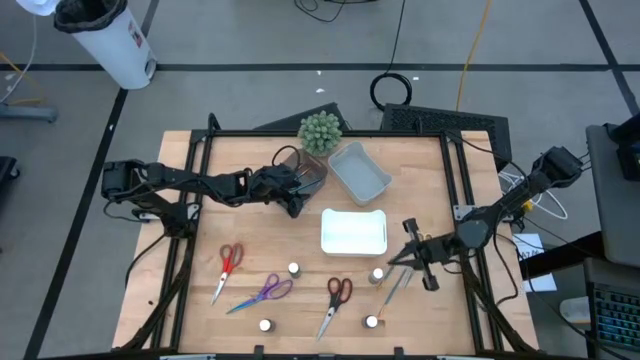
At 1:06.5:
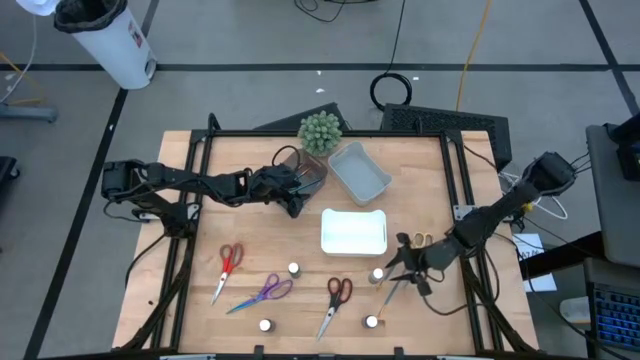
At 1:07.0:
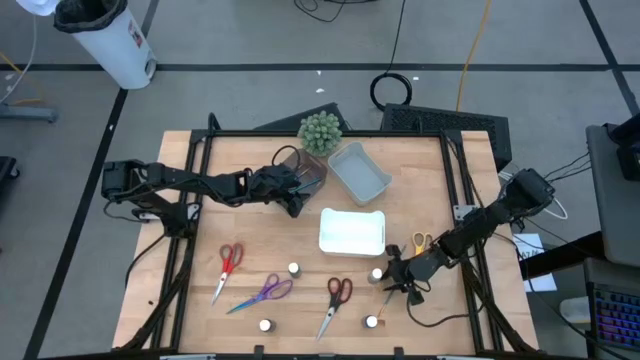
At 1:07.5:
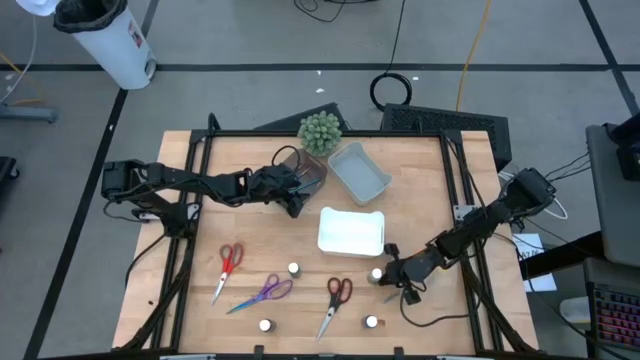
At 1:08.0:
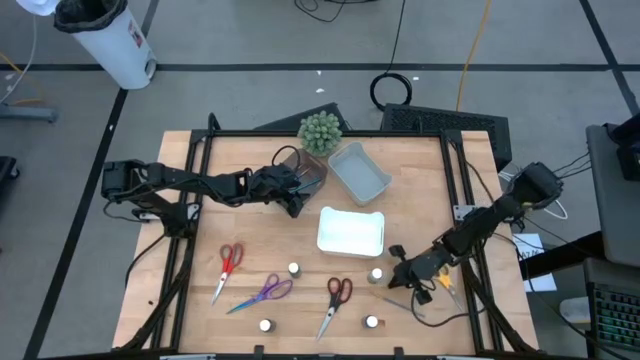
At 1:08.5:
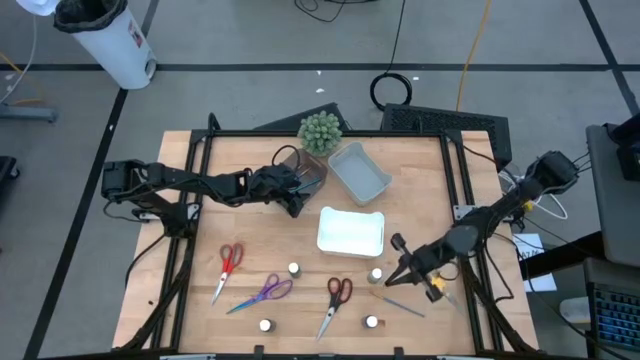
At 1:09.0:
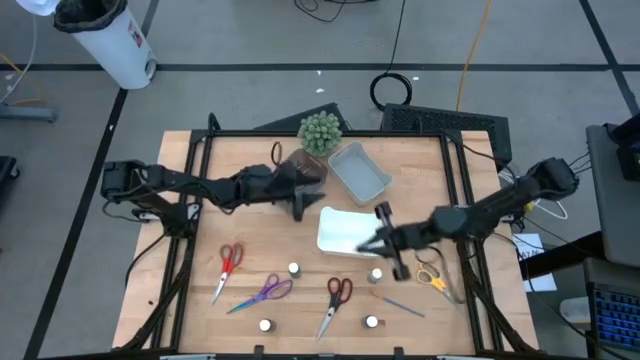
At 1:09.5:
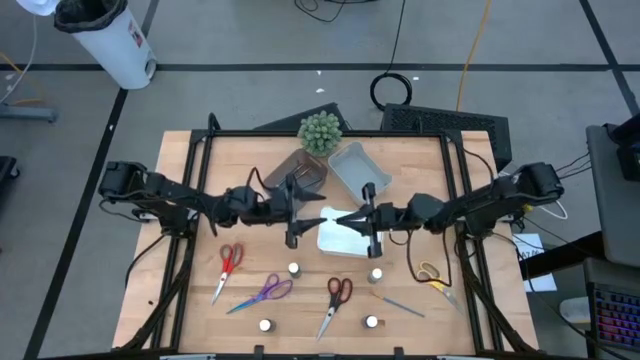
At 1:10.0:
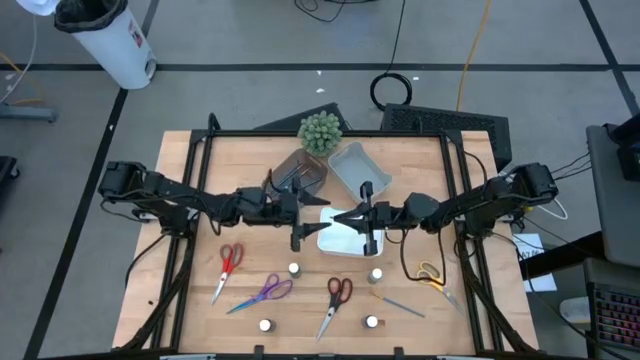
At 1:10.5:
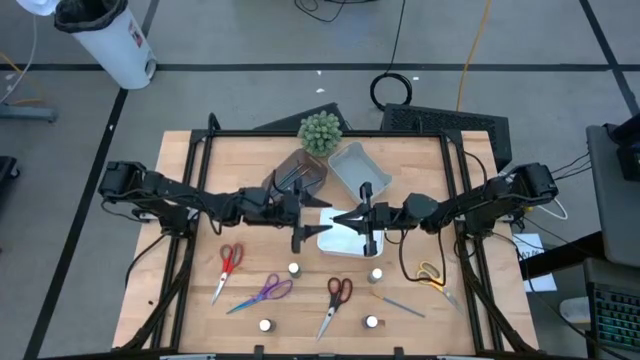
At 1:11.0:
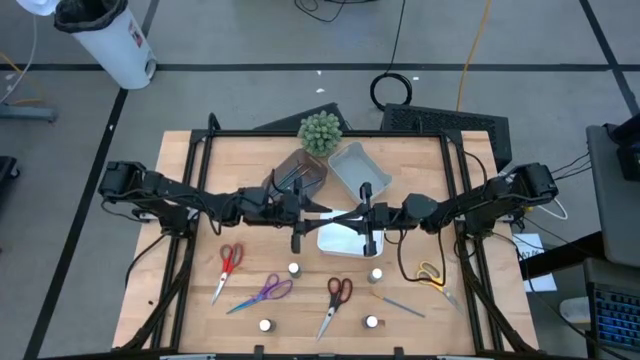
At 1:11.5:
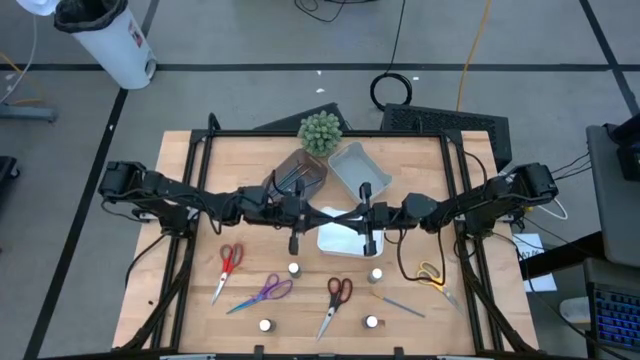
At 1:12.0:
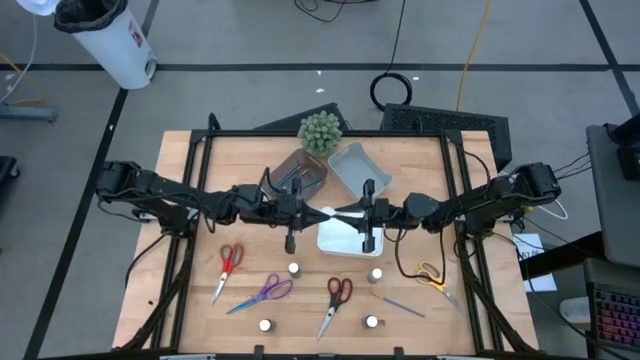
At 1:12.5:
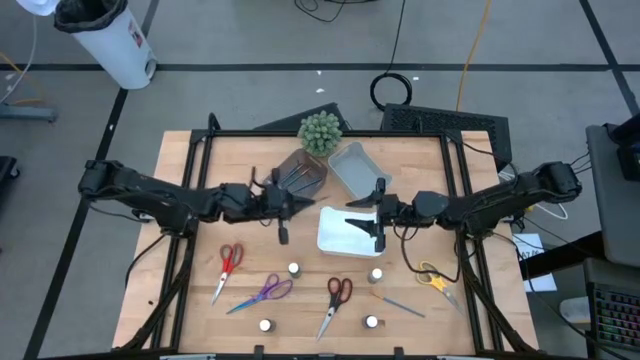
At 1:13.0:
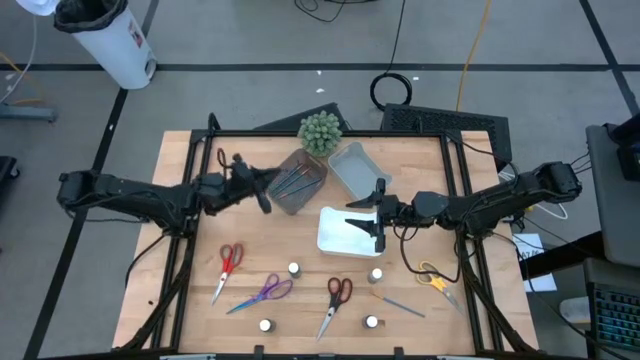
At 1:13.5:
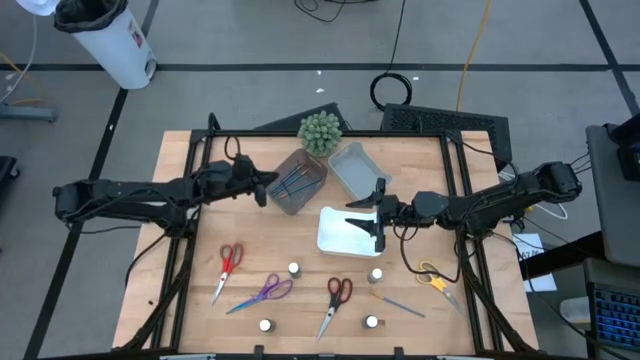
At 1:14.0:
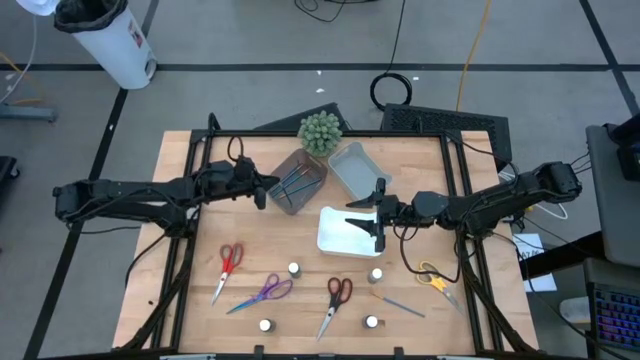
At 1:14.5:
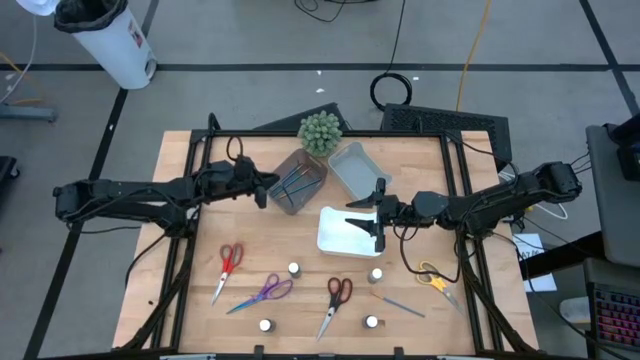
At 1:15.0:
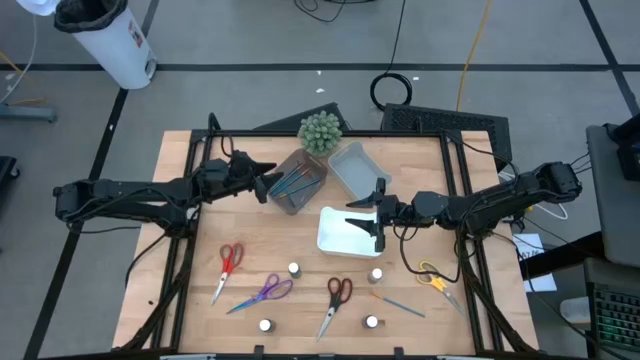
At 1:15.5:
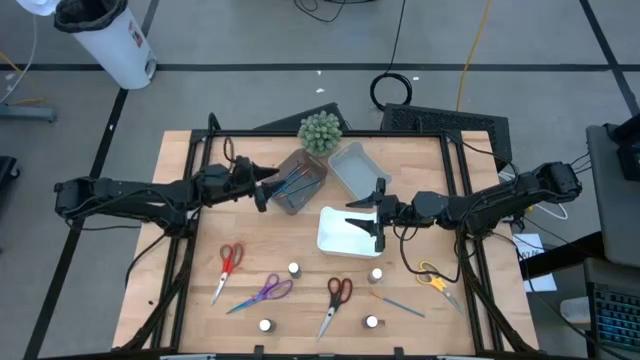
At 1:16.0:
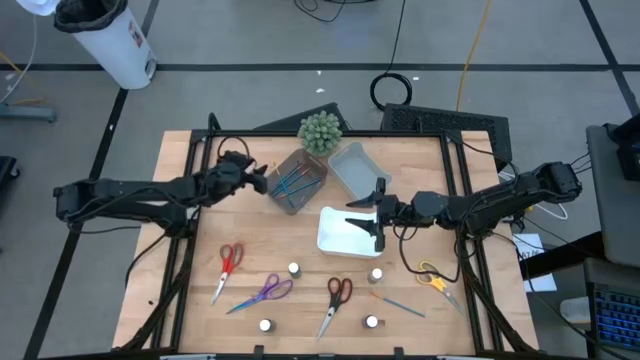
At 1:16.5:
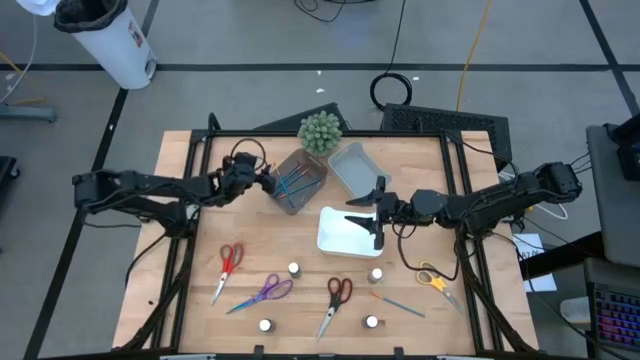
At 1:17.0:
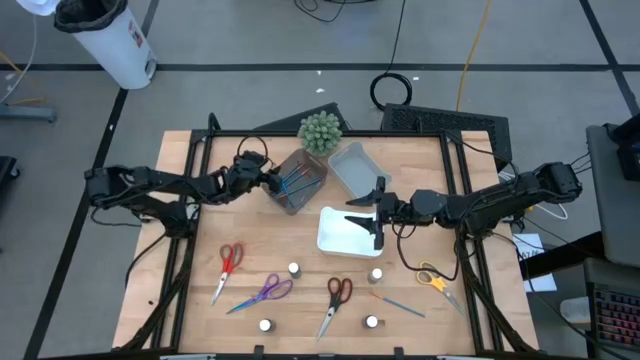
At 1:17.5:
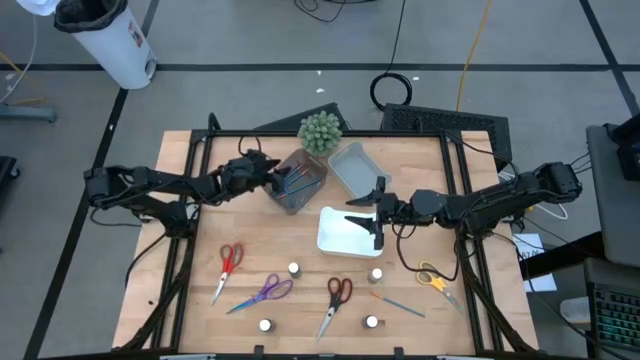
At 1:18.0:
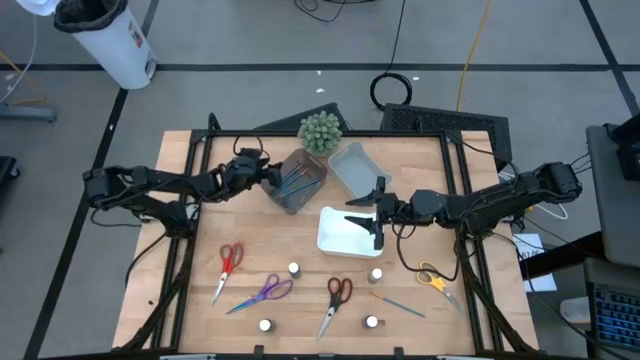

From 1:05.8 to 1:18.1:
Task: Pick & Place Paint Supplies
Put the blue paint brush into the black bin

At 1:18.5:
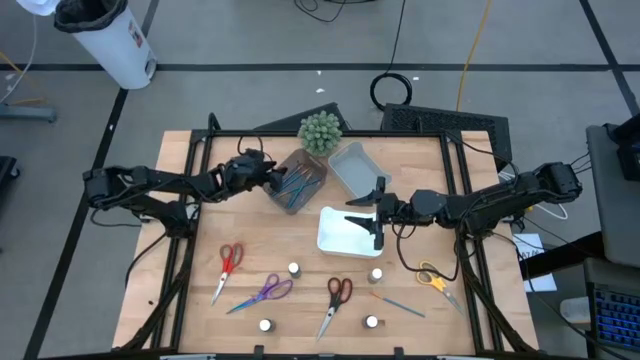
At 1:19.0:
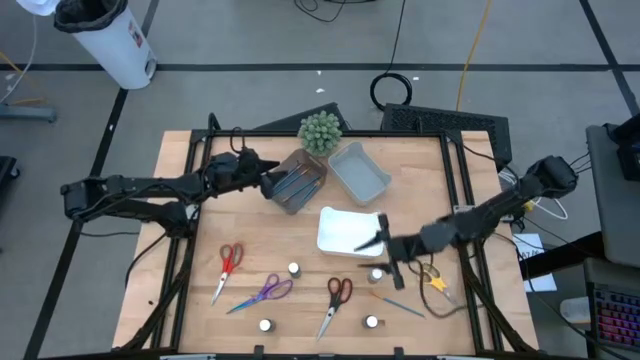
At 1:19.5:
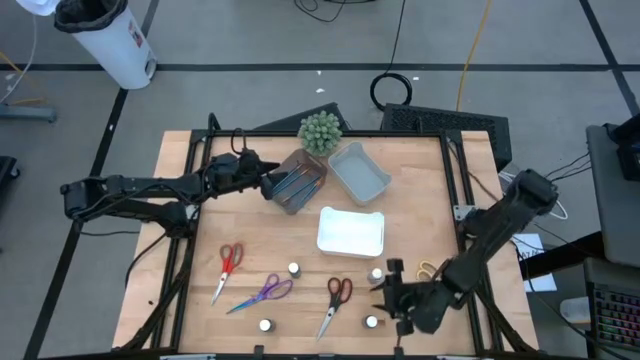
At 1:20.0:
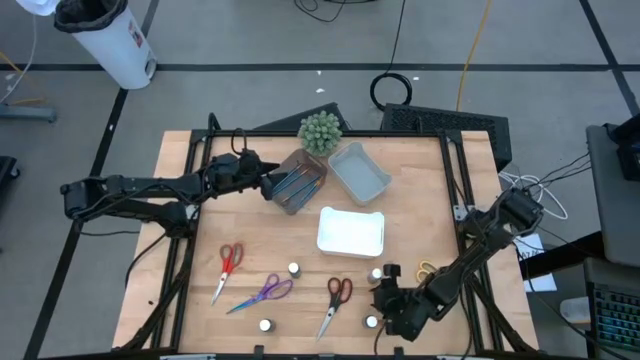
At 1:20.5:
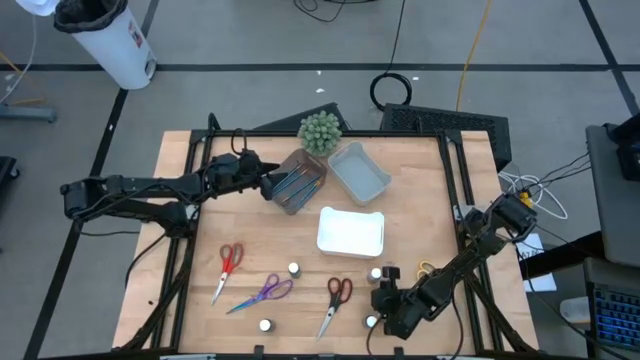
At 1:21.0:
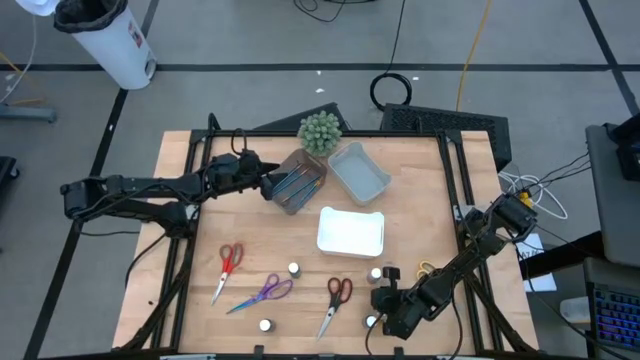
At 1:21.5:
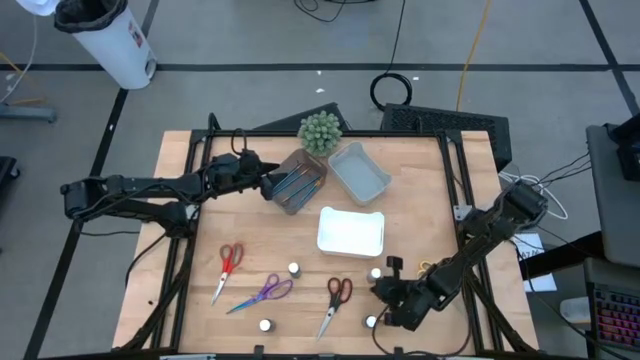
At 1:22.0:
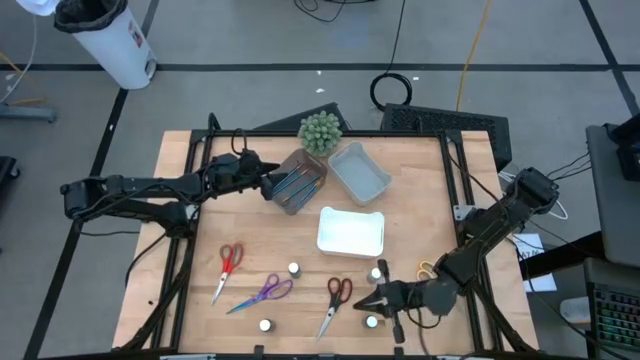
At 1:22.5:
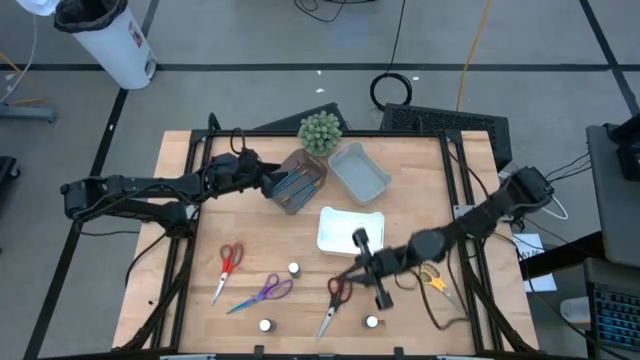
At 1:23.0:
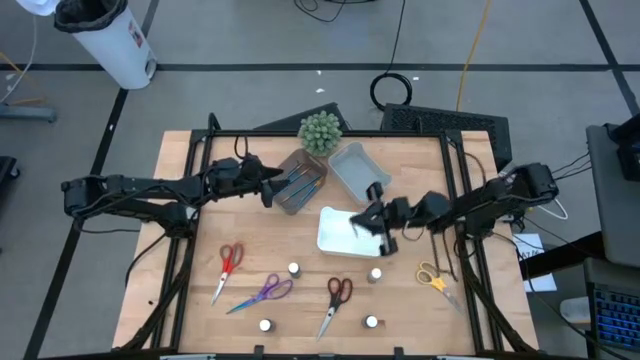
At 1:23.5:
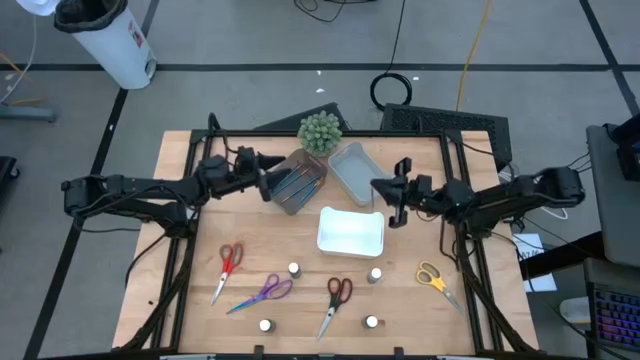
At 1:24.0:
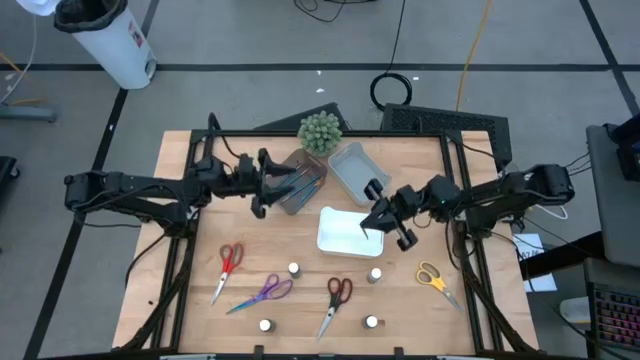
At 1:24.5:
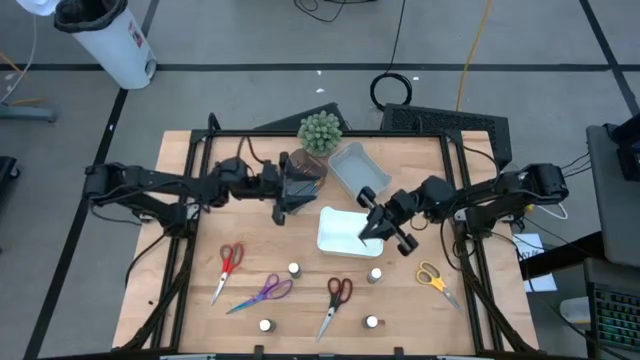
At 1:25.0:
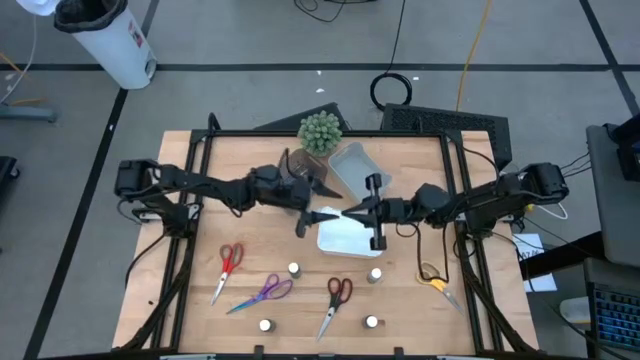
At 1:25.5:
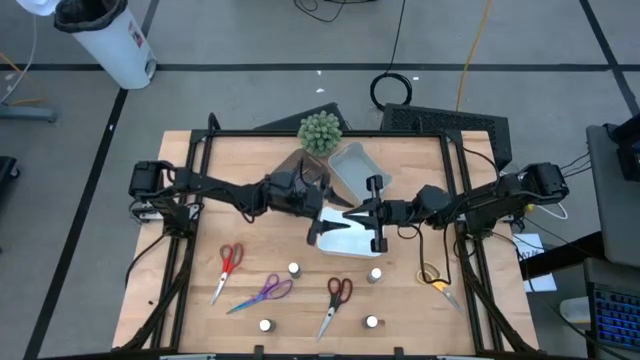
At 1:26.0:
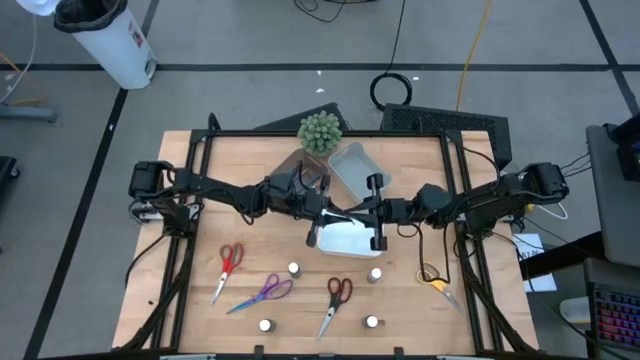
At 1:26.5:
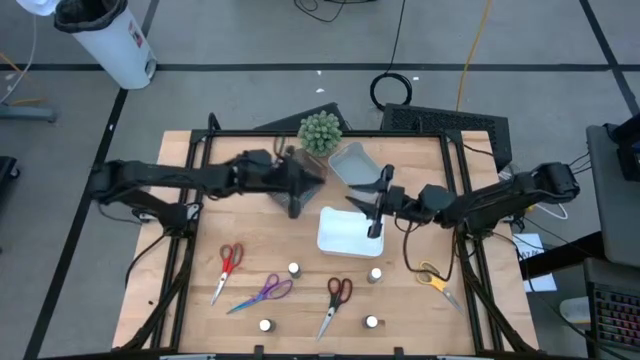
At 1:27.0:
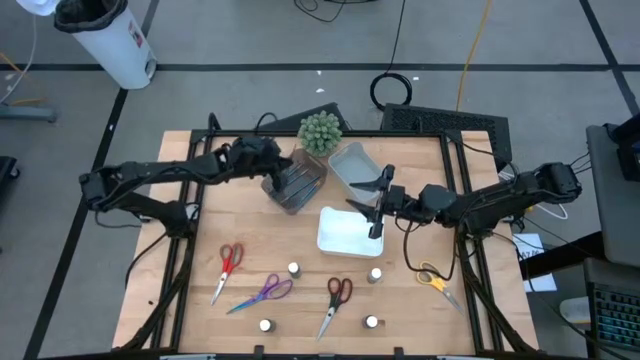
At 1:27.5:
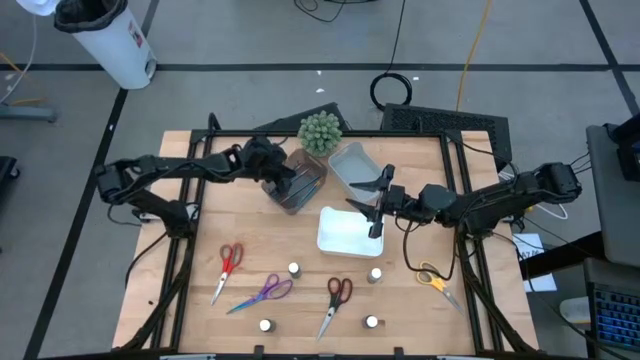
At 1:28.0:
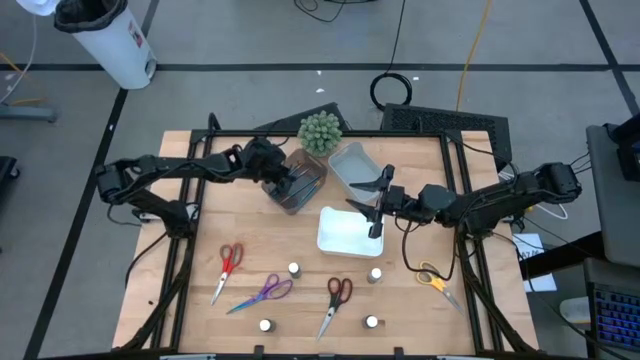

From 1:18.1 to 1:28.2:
Put the blue paint brush into the black bin
